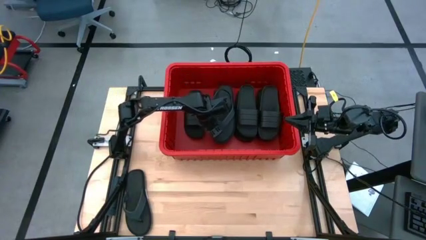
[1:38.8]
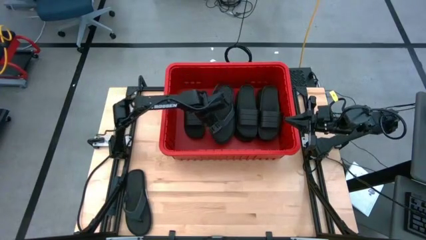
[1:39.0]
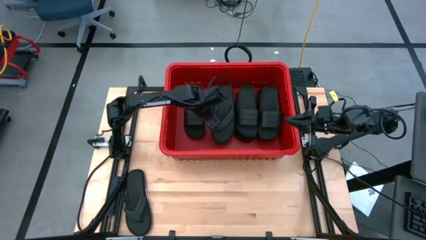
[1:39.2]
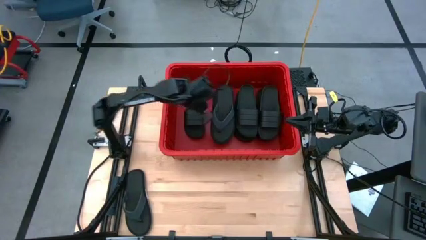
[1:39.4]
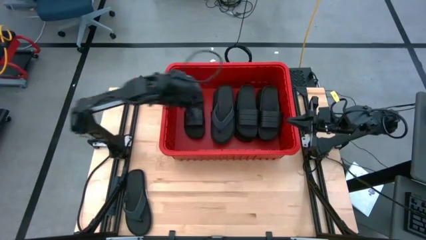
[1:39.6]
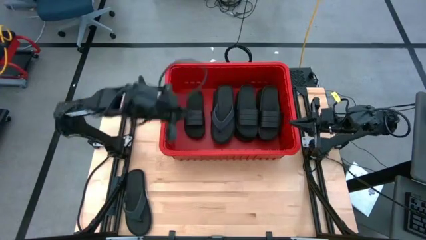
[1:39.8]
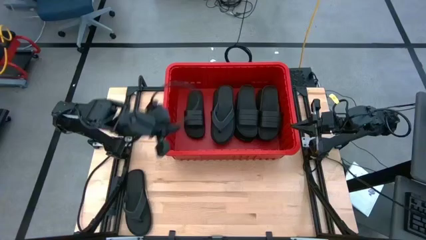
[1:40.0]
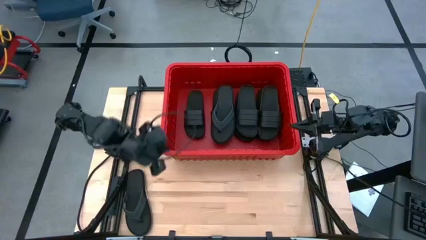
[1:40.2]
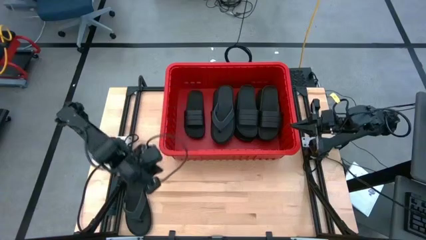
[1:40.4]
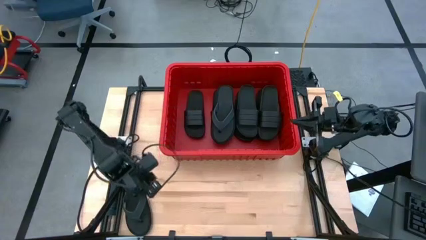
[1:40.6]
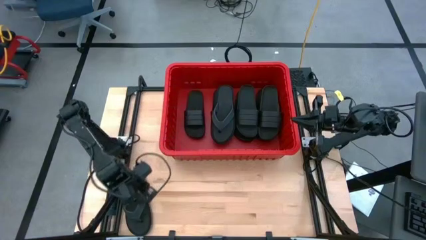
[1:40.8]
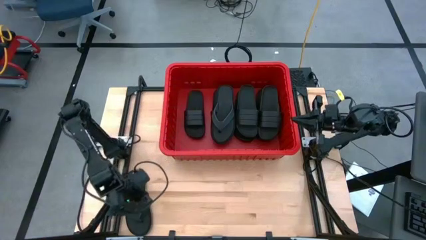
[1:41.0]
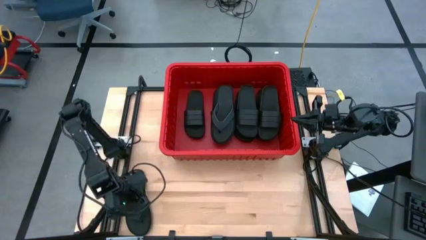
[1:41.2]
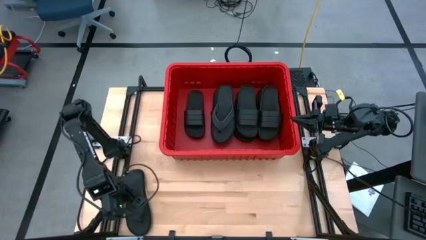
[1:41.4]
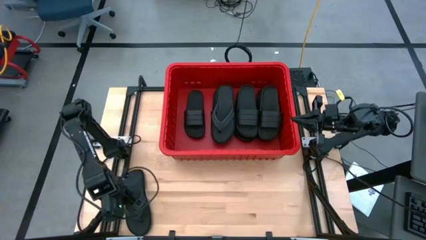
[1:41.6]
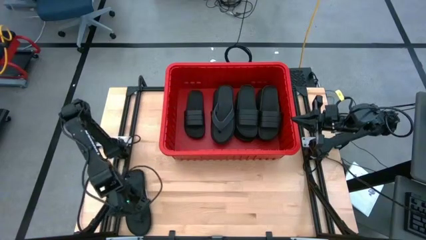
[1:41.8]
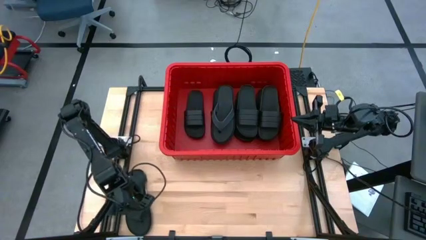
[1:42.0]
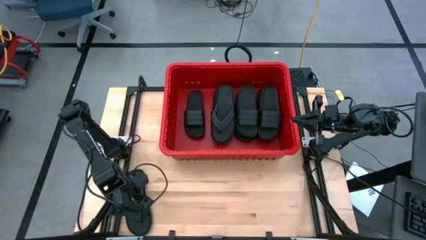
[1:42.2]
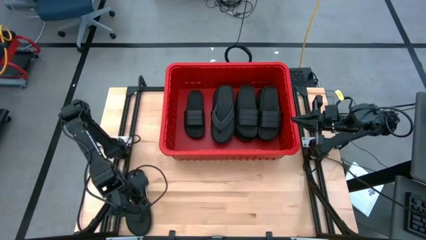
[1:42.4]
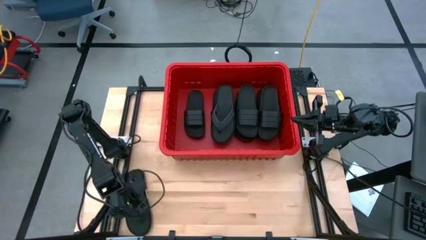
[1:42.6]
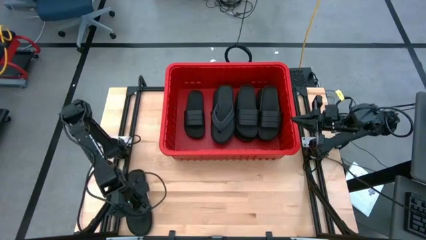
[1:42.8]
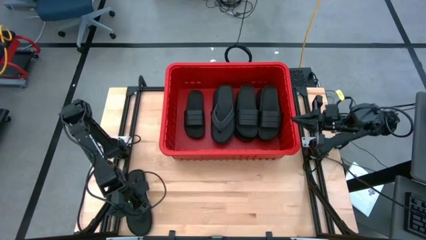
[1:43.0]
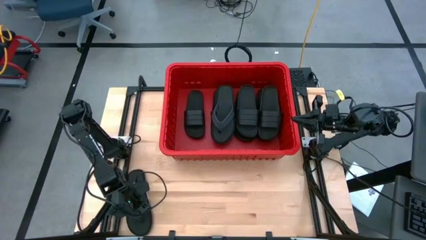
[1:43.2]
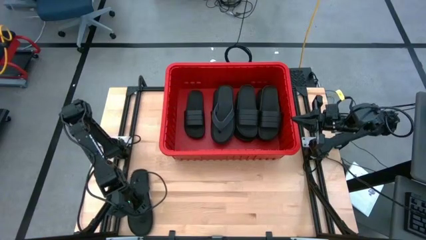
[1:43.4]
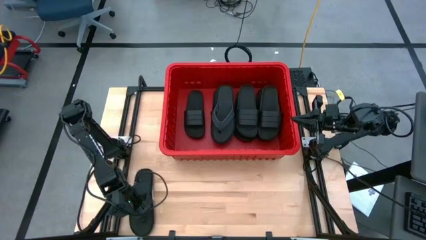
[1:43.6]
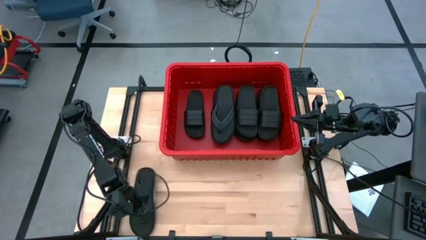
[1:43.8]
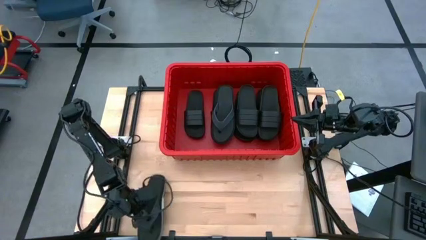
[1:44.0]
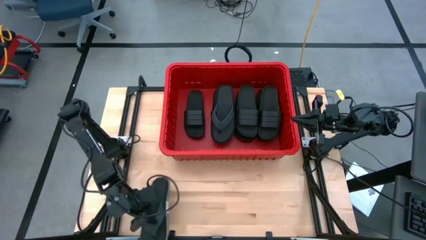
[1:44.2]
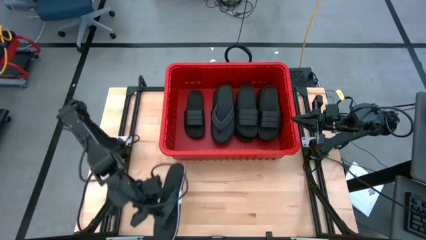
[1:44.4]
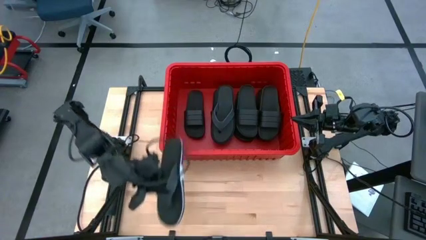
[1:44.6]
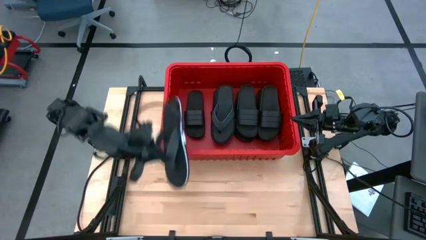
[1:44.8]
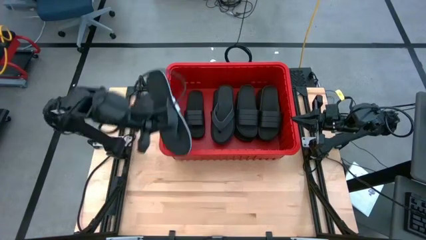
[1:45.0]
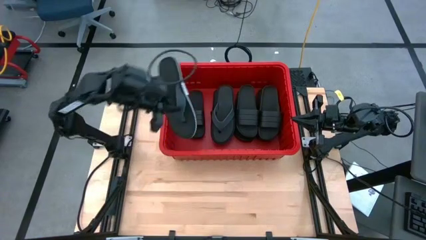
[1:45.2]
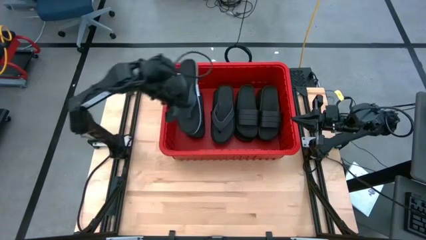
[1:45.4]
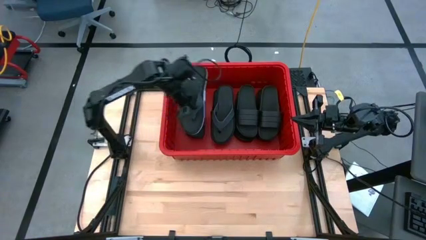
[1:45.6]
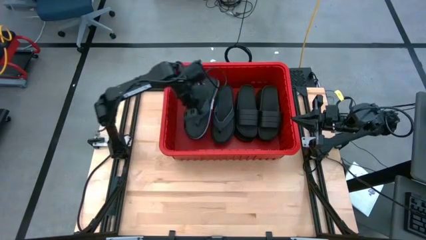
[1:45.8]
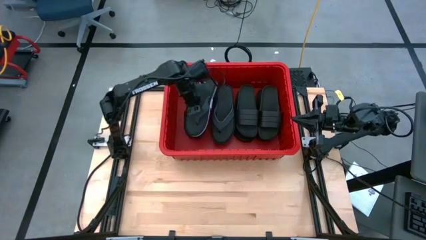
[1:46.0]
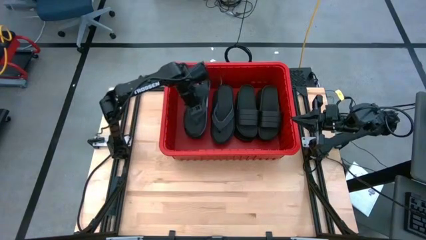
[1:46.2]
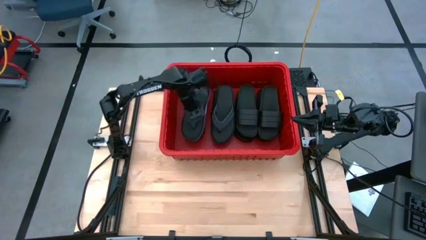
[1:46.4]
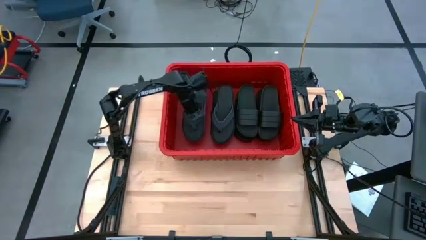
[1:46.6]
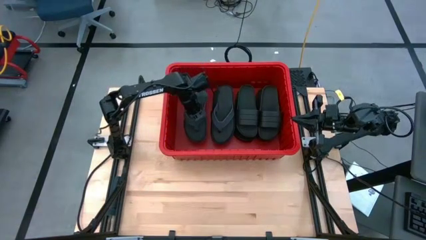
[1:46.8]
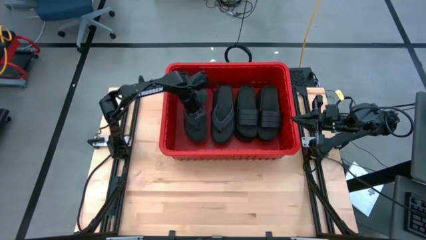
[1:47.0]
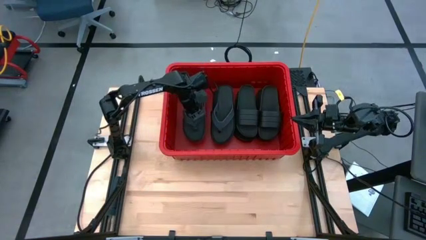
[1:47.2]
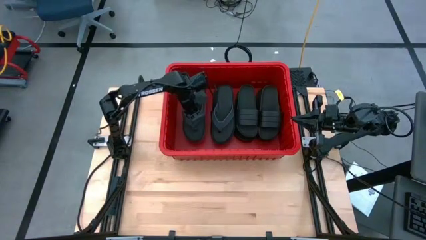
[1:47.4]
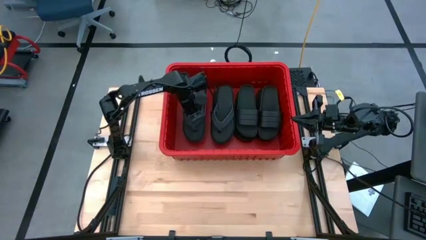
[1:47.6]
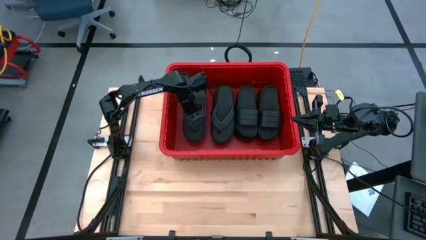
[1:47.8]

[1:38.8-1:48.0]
Task: Pick and place slides into bin
Put the black slipper into the red bin

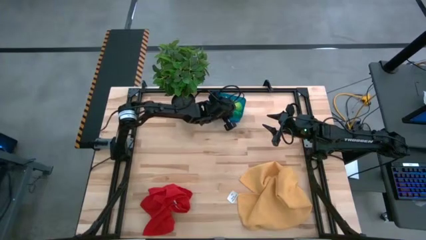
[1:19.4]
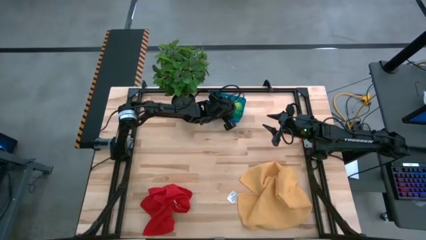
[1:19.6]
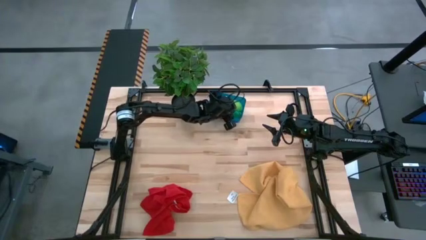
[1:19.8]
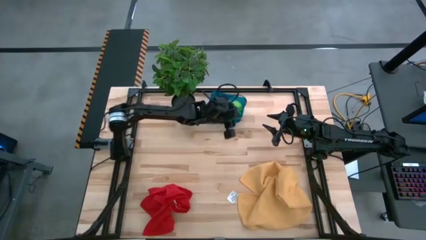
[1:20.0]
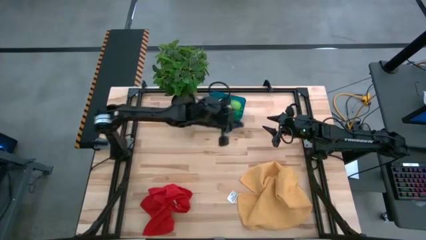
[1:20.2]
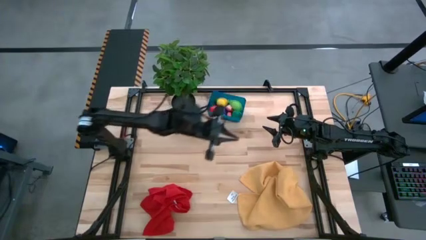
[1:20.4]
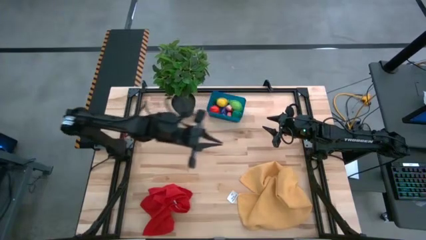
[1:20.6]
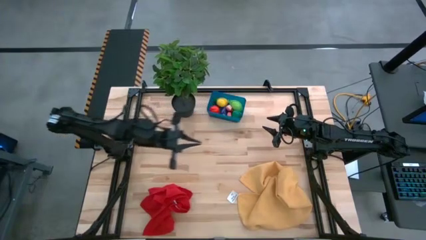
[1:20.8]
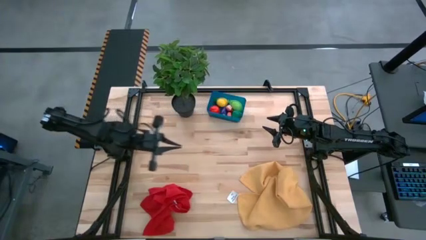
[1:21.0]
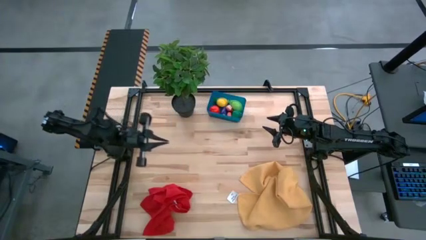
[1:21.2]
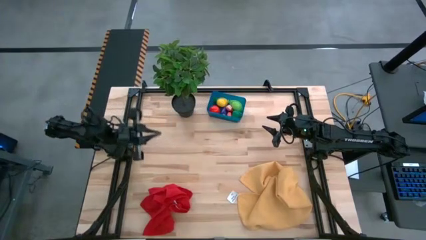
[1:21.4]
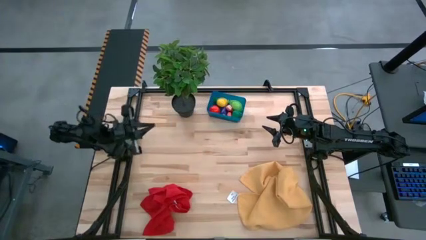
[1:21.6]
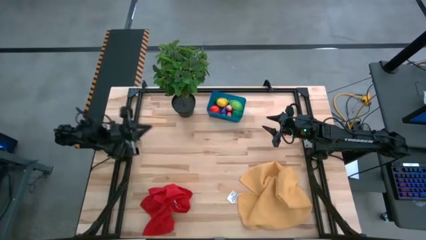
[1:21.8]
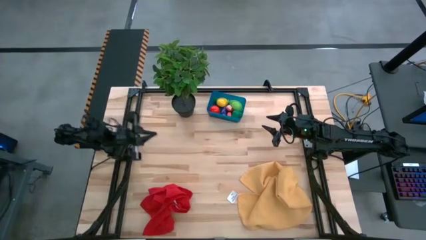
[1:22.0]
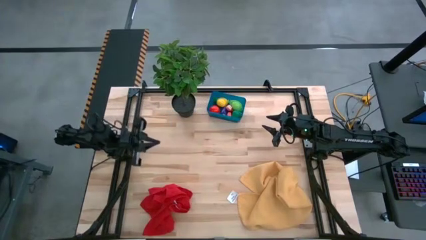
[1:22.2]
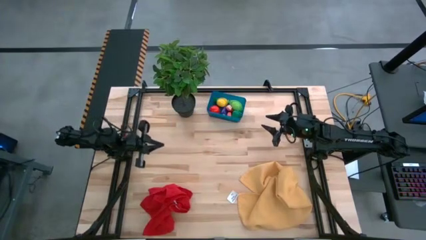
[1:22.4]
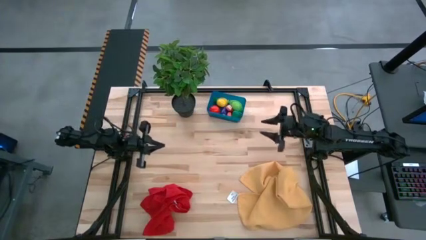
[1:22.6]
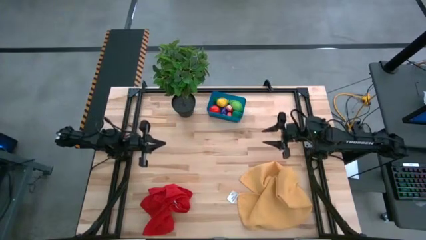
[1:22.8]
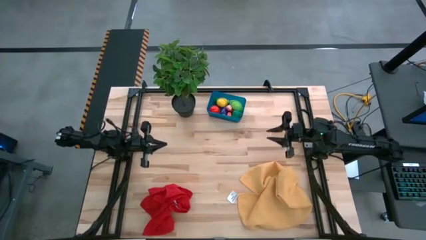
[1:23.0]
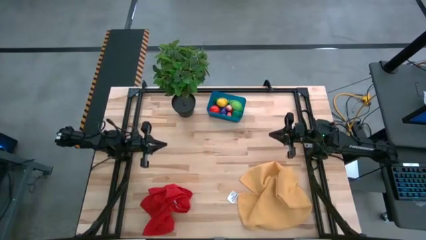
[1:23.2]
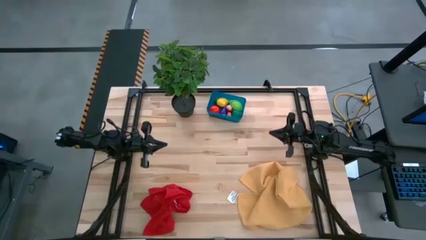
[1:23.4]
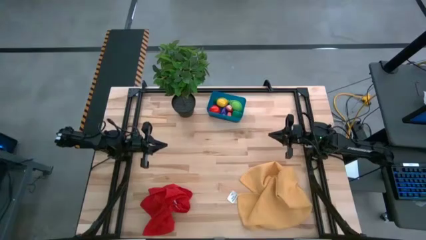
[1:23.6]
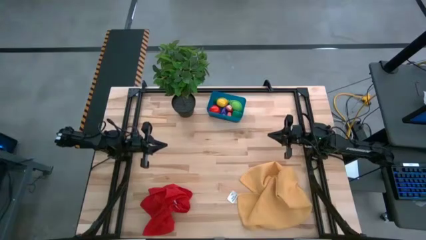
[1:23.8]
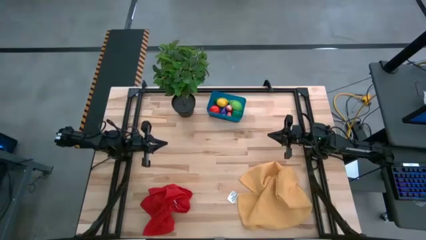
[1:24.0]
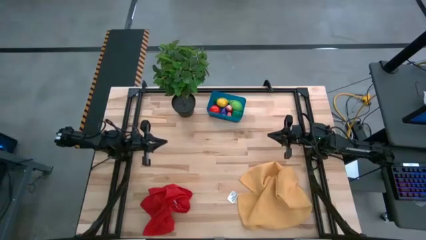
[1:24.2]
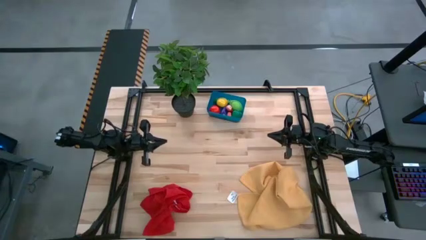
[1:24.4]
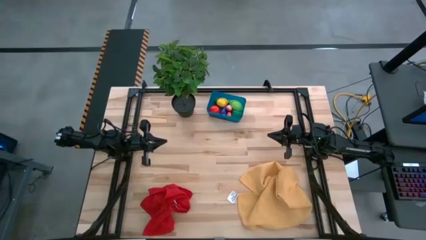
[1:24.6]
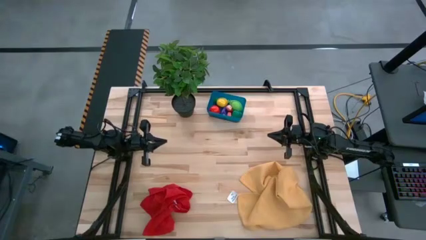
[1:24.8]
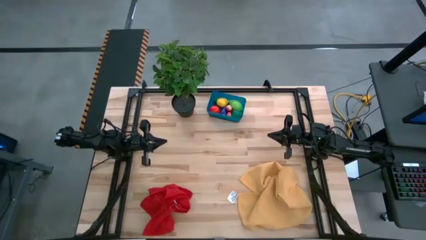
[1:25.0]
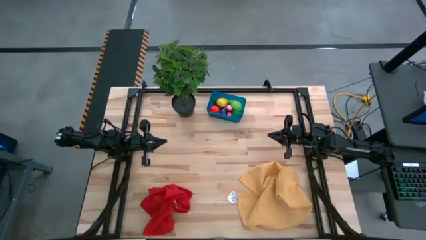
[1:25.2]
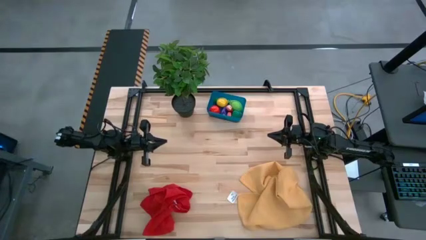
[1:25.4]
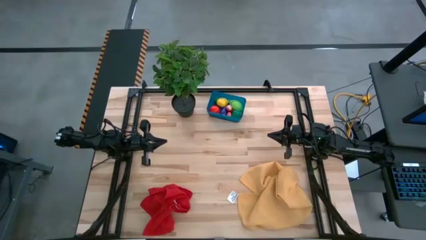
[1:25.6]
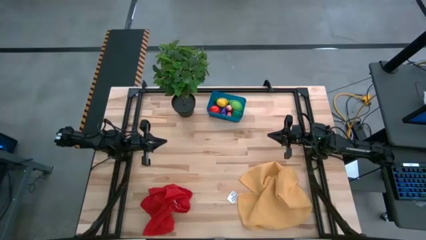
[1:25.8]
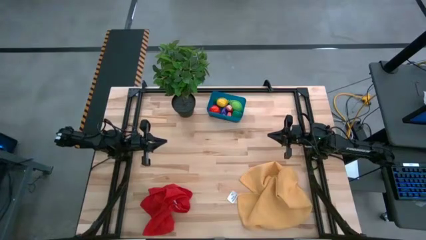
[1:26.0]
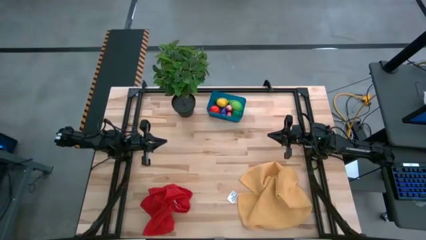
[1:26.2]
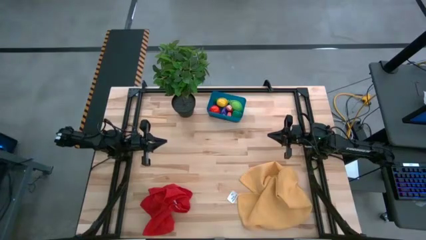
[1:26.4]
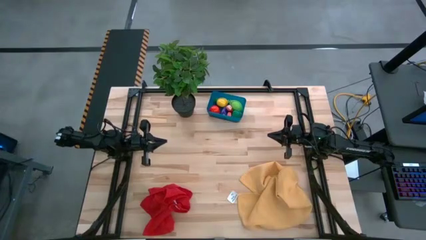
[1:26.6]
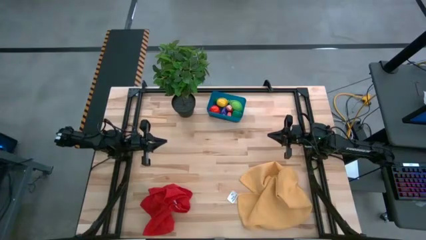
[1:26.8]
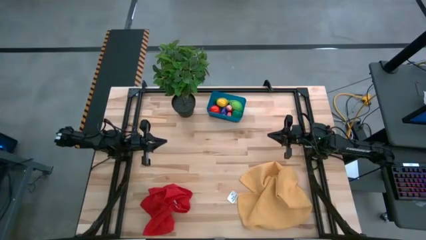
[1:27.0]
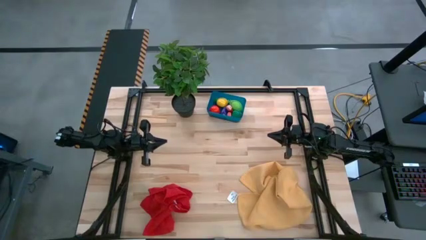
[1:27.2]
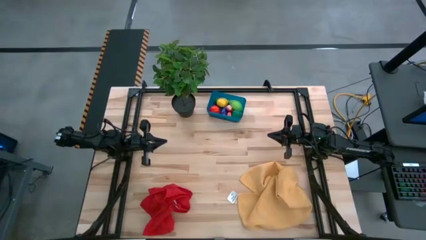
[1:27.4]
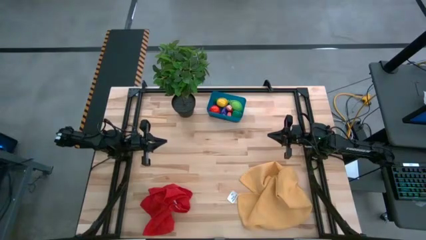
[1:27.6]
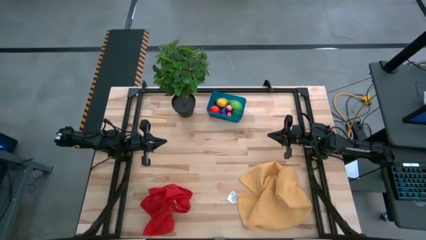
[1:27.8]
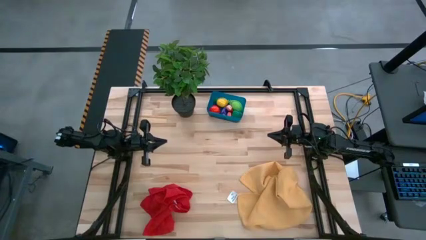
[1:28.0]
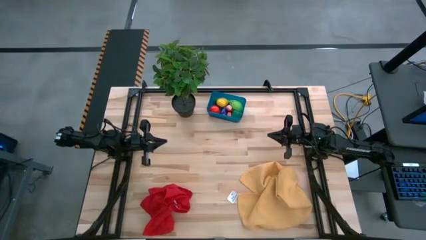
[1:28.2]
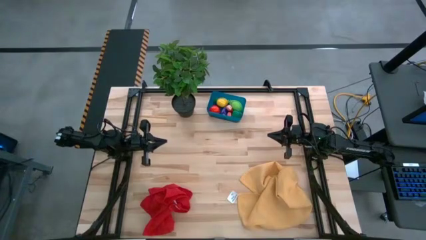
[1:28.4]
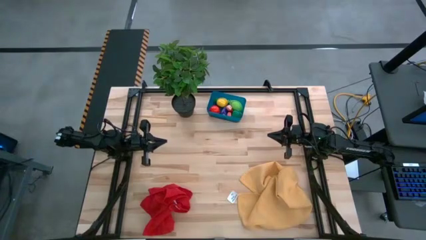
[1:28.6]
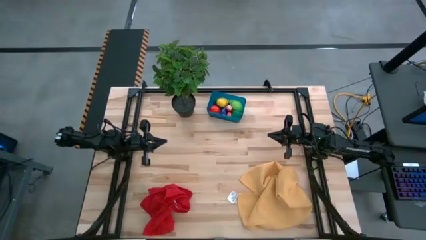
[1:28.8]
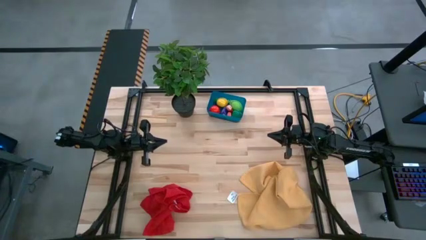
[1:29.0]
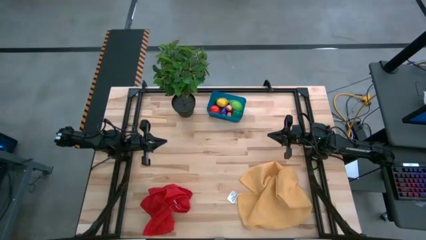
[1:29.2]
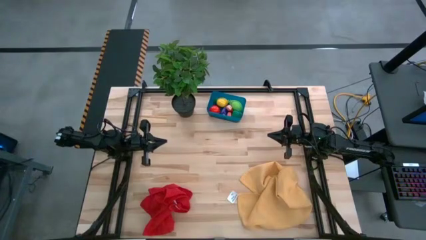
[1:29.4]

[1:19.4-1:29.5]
Task: Pick and placing Produce into tupperware
Return to Home Position
